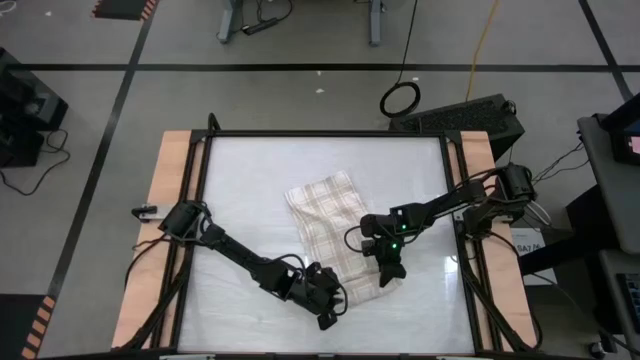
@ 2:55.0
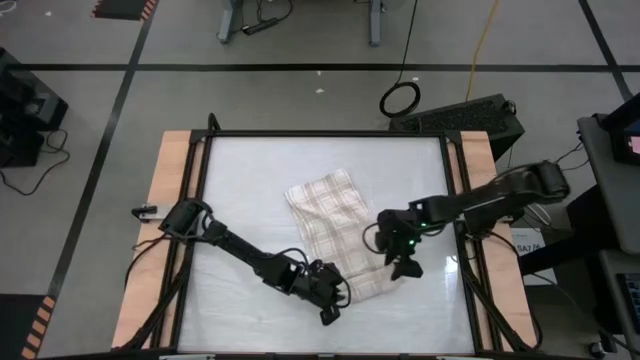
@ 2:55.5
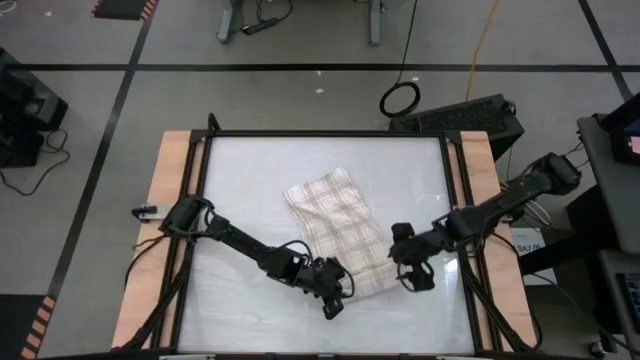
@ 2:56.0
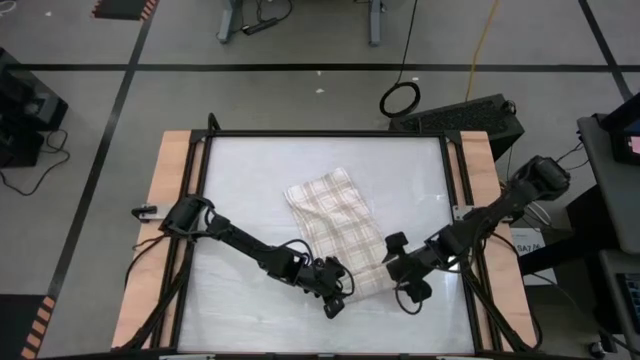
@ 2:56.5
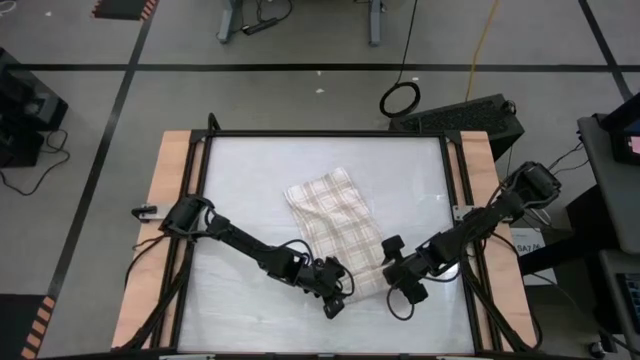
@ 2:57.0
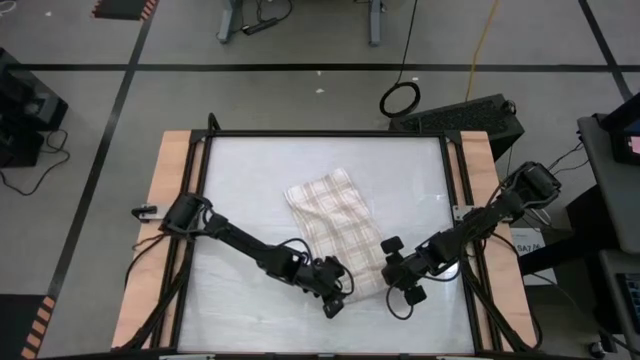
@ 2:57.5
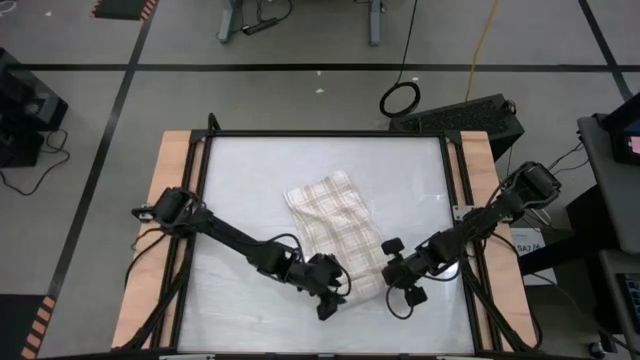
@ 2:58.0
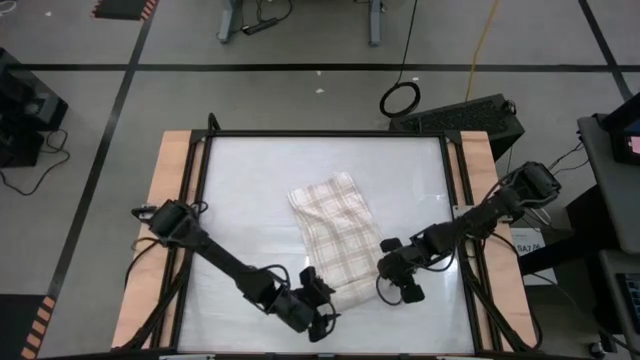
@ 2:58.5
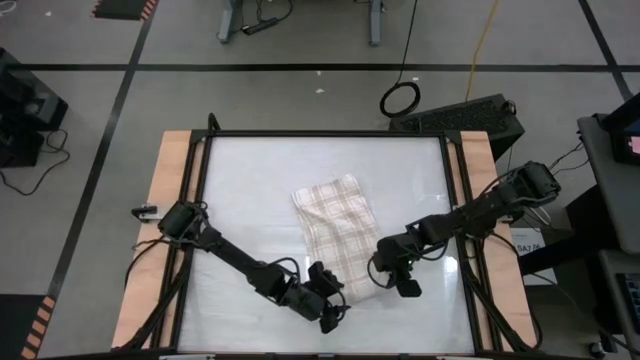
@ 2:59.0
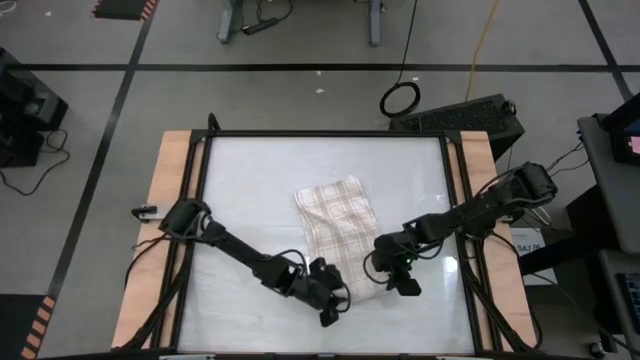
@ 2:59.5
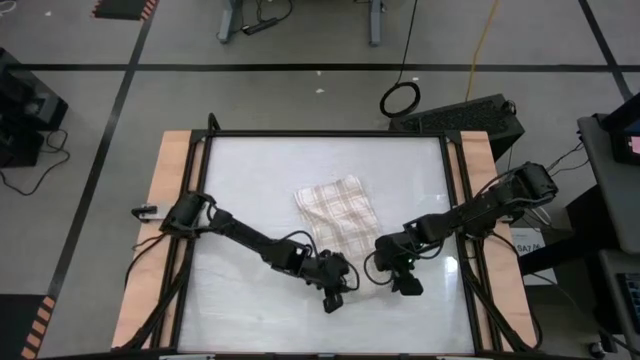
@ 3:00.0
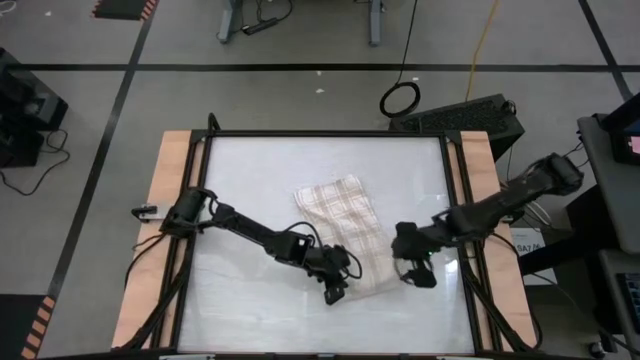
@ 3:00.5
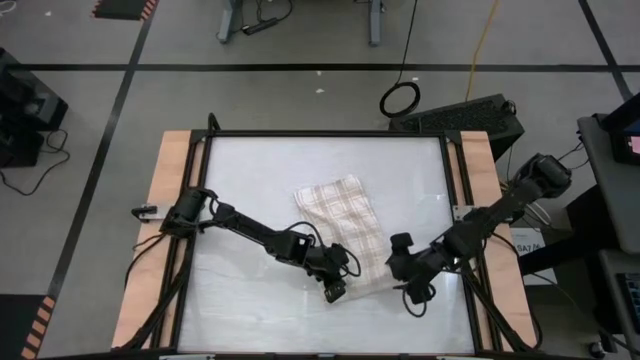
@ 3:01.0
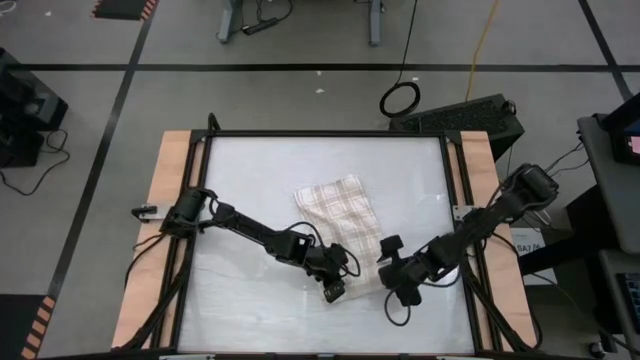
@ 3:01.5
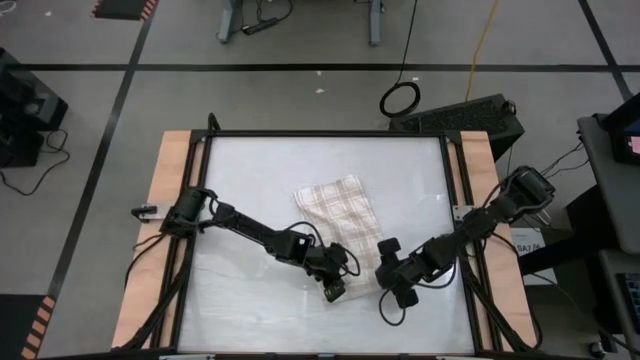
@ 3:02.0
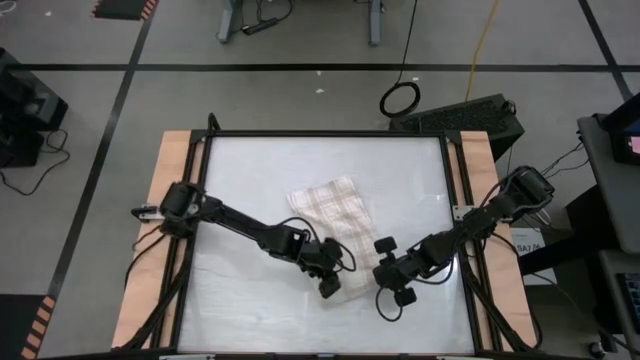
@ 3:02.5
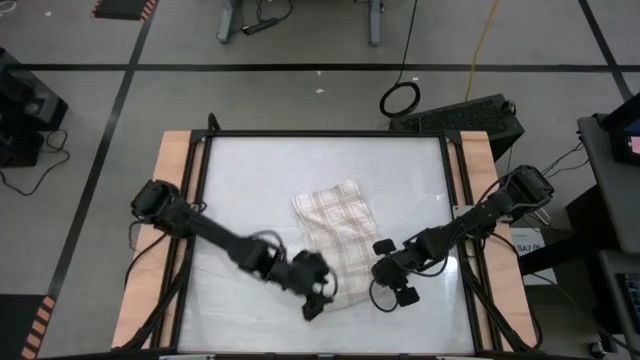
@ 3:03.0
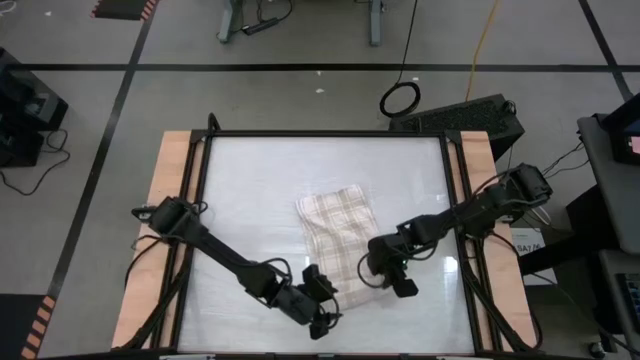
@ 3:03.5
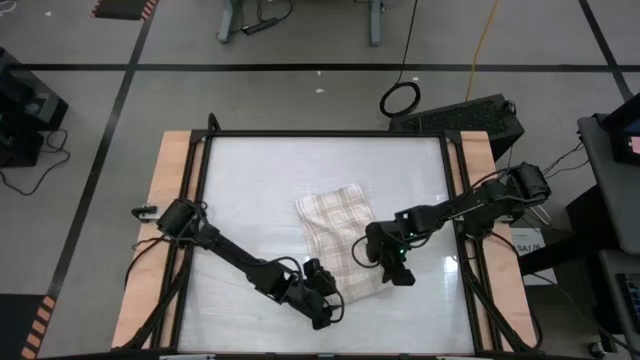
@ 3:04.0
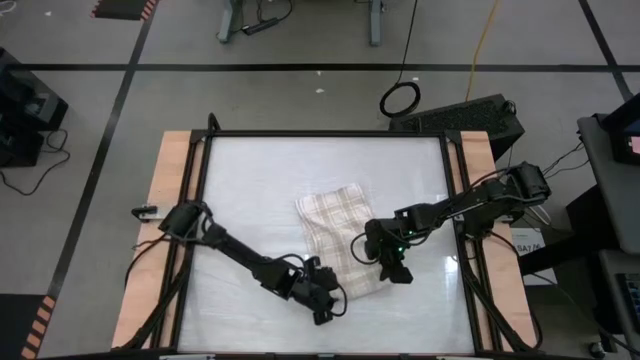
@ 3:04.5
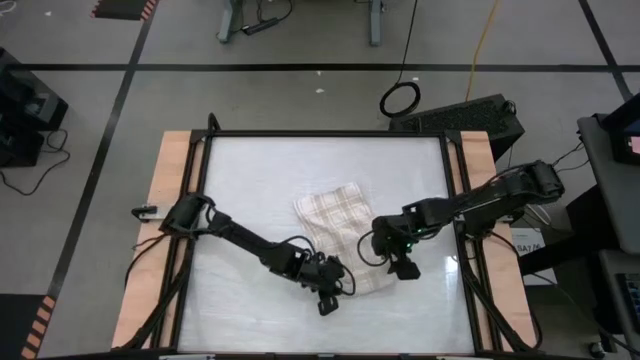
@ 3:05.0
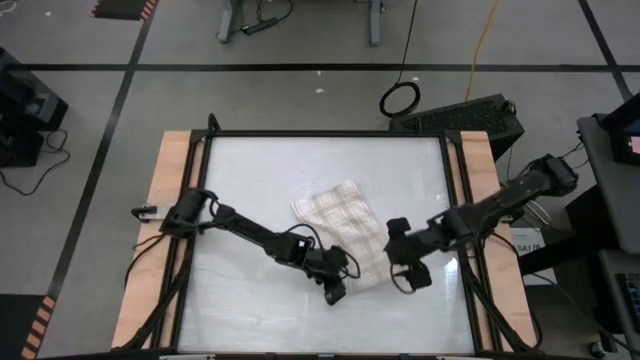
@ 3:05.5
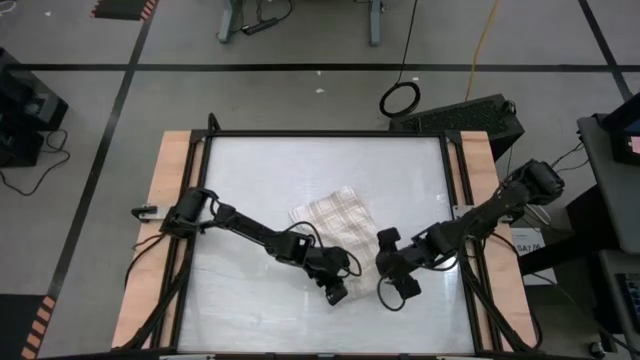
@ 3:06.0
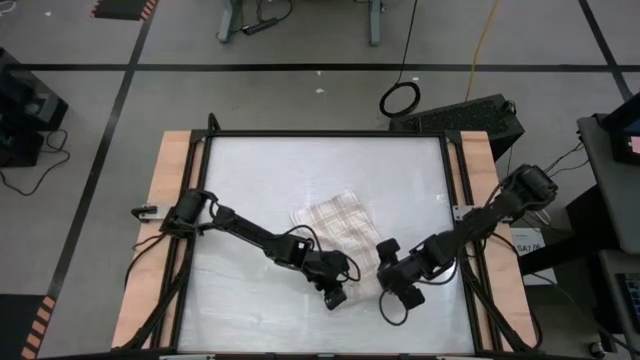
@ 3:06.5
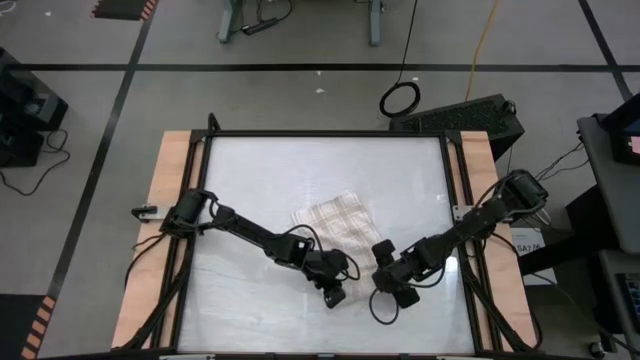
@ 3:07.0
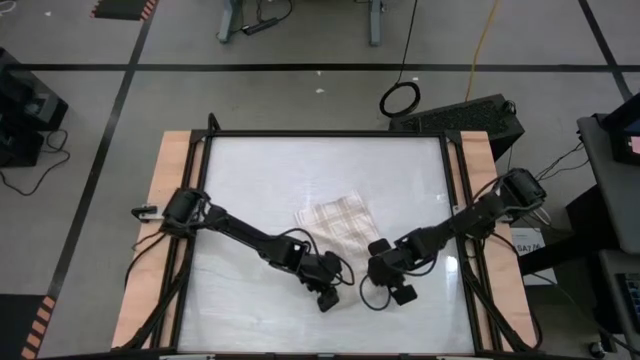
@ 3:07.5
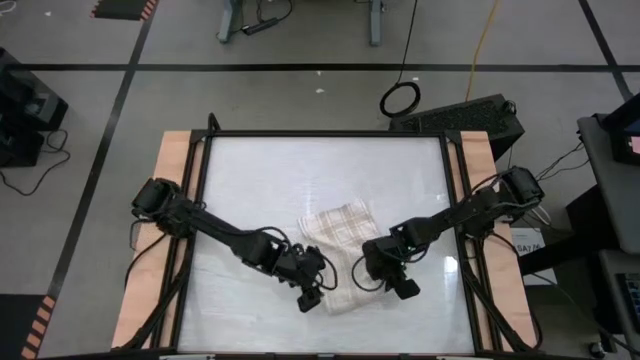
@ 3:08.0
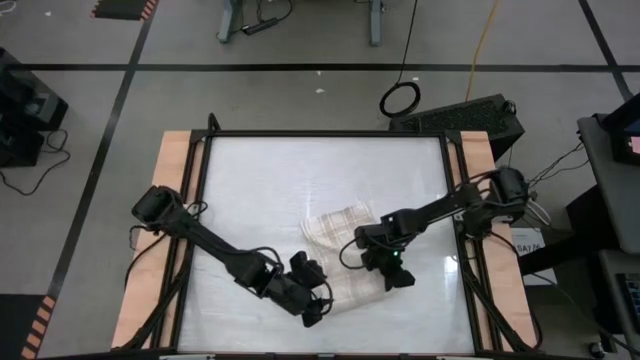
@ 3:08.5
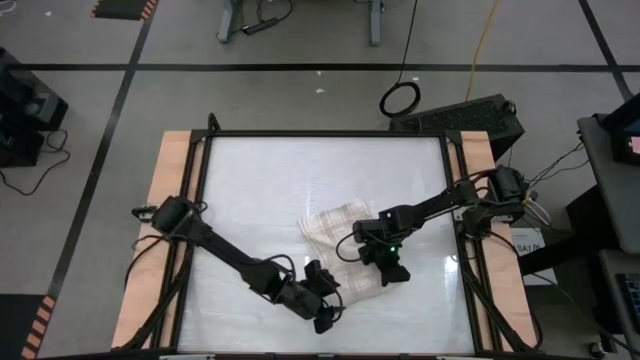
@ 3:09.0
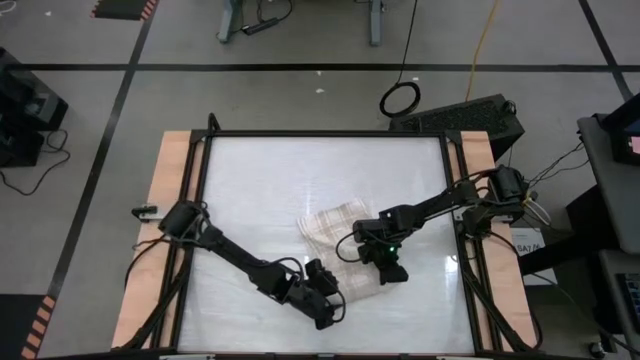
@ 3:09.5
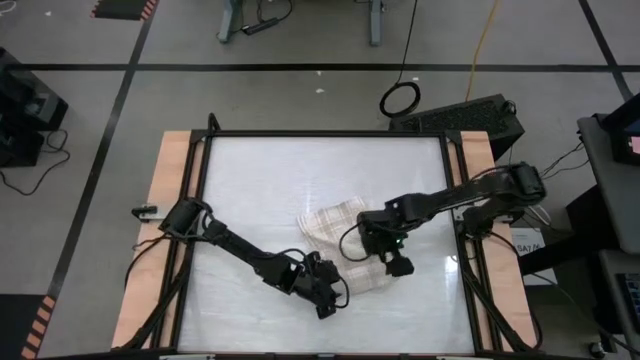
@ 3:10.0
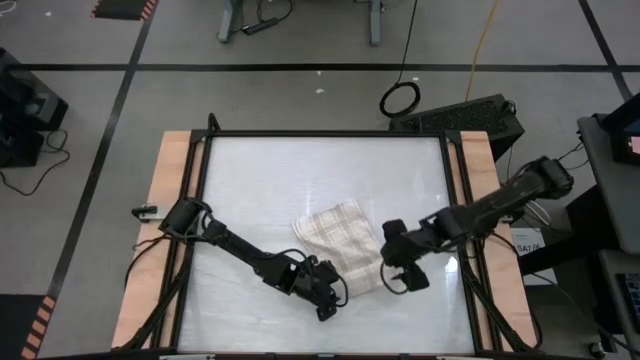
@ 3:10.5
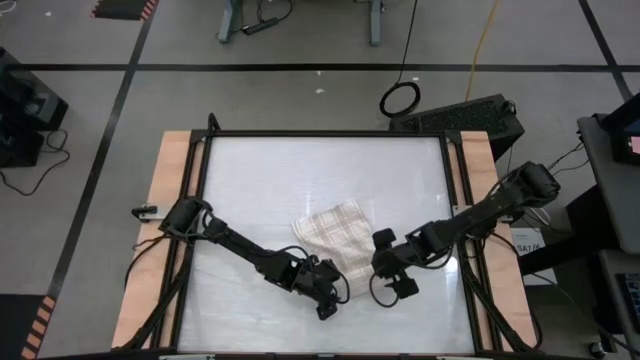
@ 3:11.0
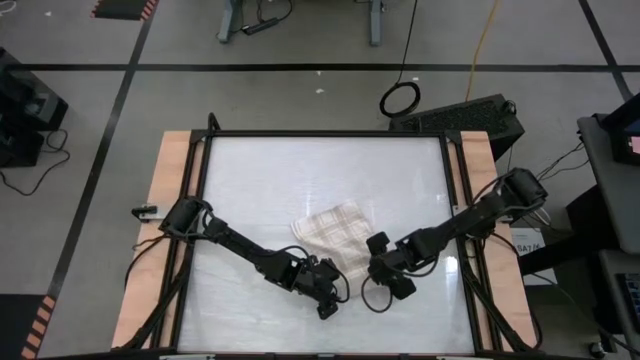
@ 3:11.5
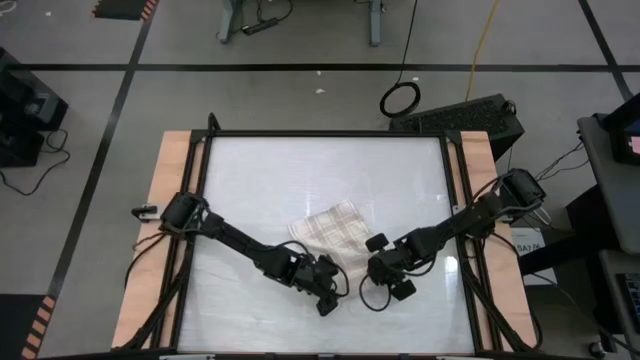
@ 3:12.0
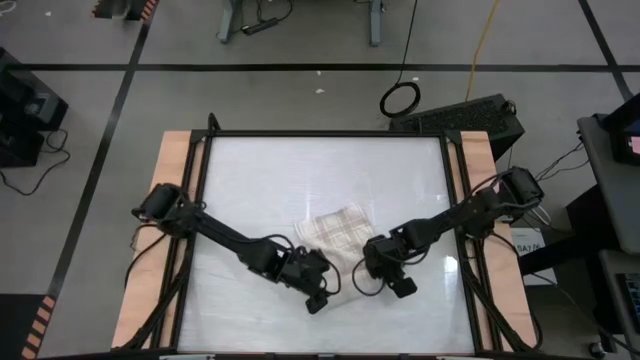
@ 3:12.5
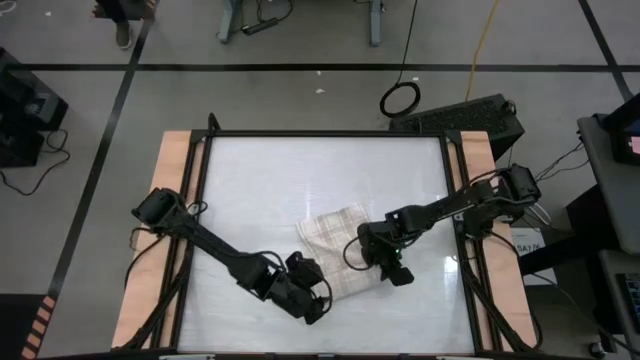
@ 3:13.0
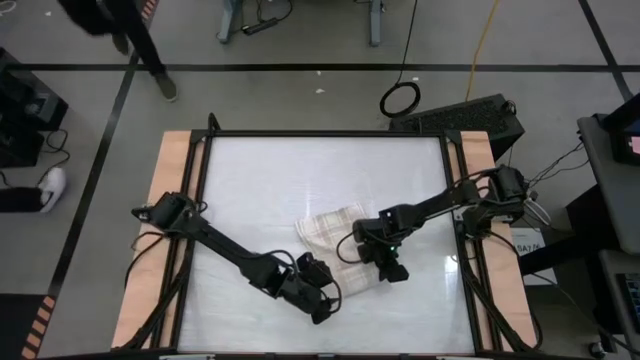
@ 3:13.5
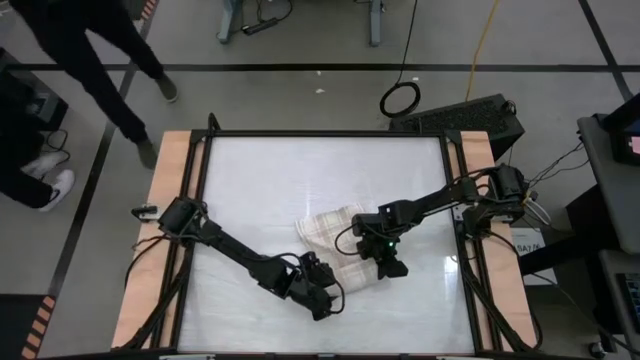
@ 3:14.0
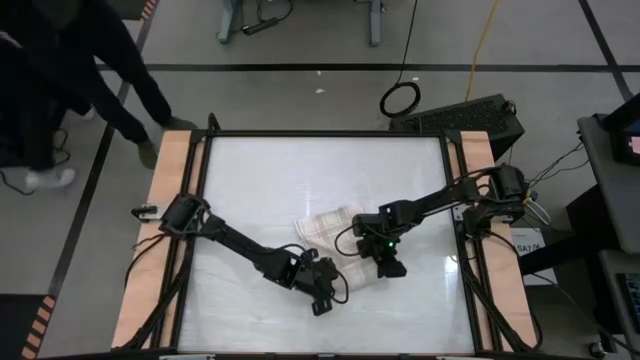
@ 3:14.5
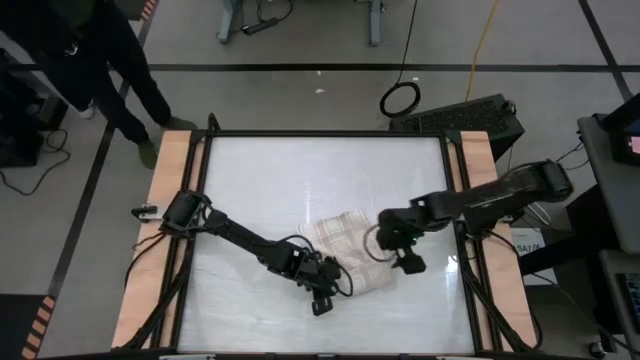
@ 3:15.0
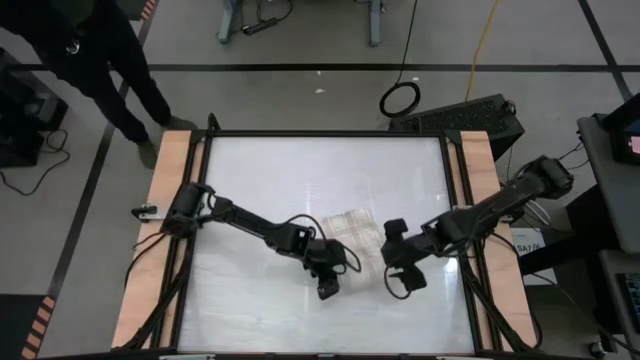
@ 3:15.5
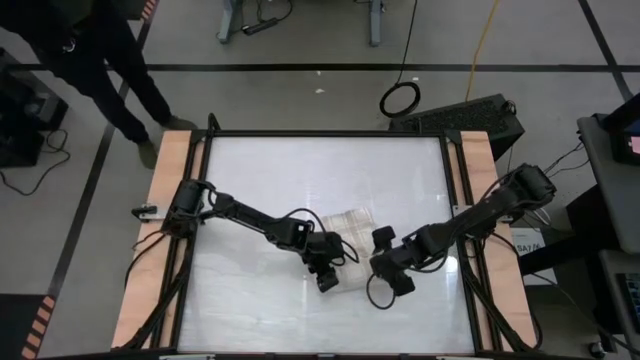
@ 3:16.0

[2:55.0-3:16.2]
Task: Roll towel
Roll the white-brown patterned towel

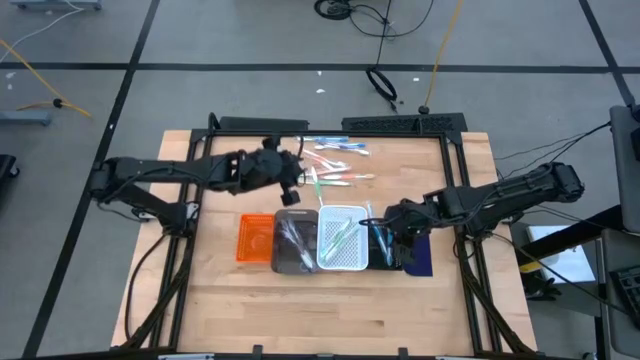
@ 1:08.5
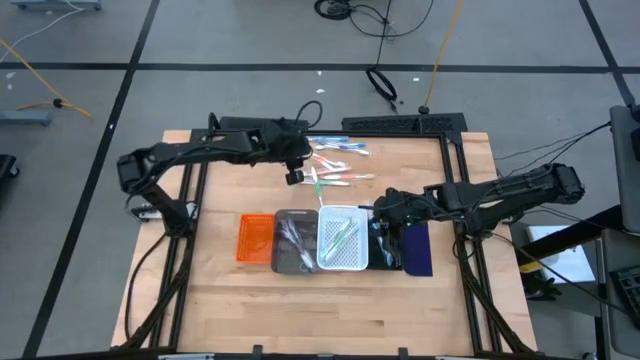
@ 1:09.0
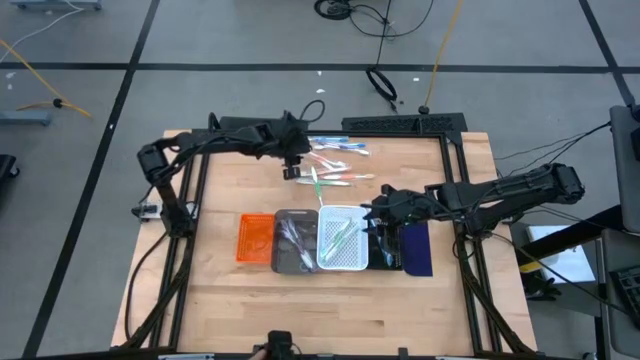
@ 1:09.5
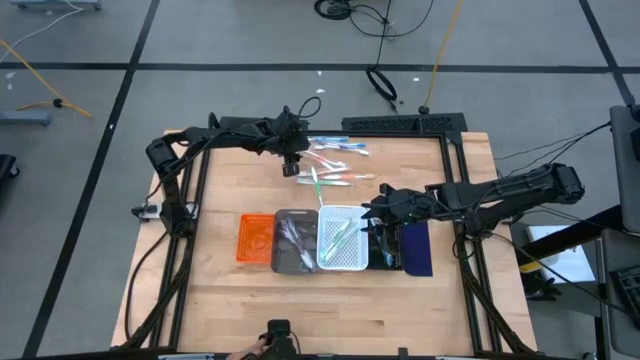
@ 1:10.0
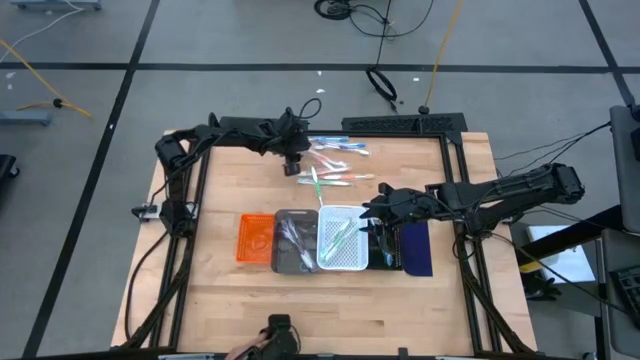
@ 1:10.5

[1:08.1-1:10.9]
Task: Pick & Place Toothbrushes
Put the orange toothbrush into the orange bin
